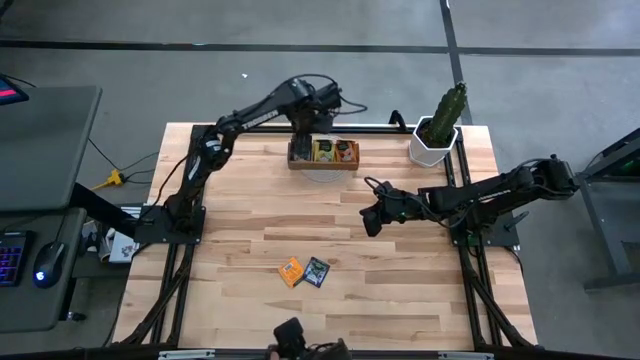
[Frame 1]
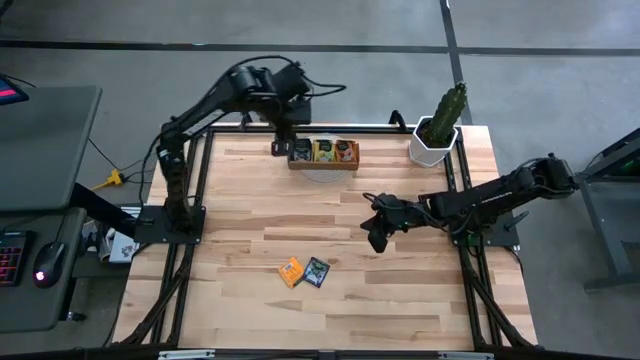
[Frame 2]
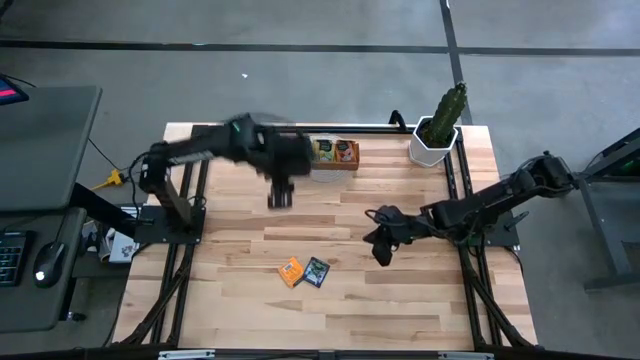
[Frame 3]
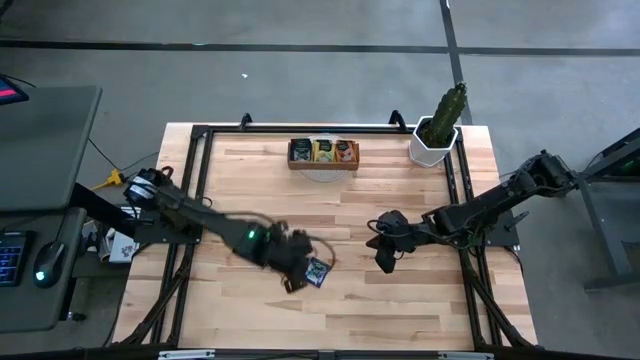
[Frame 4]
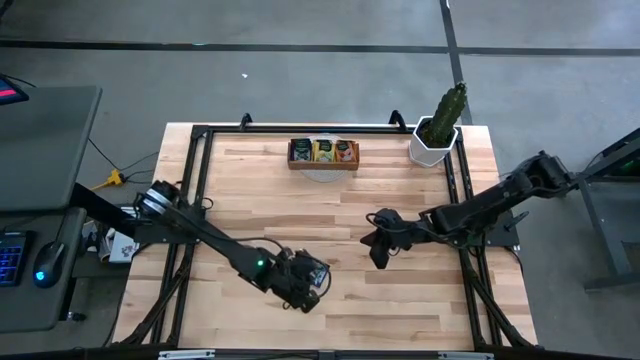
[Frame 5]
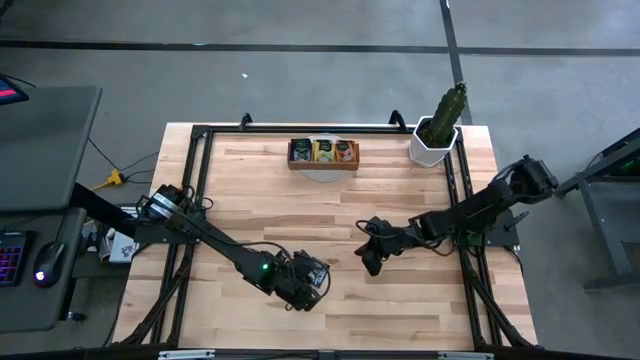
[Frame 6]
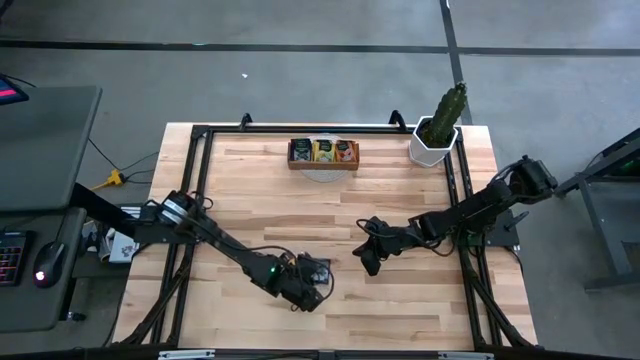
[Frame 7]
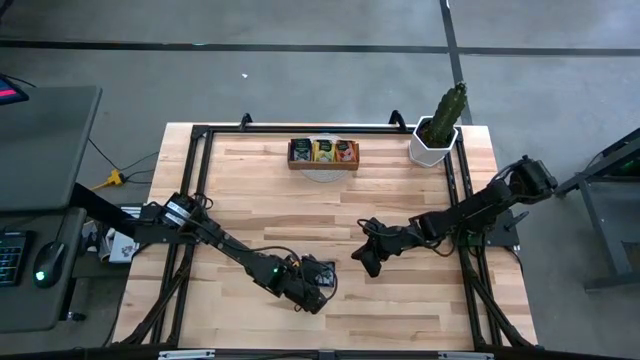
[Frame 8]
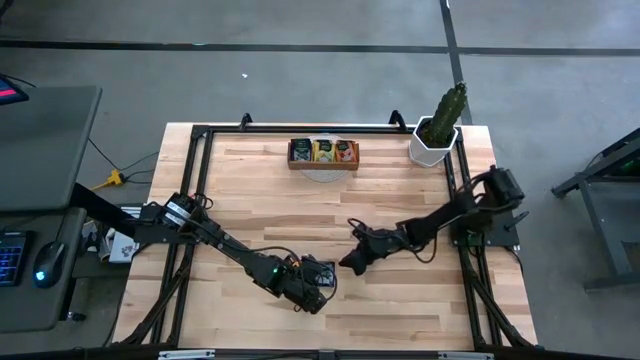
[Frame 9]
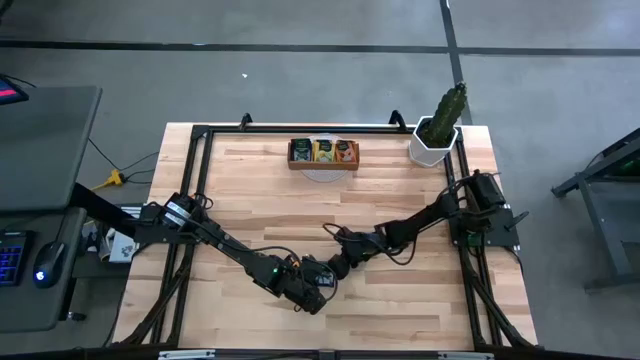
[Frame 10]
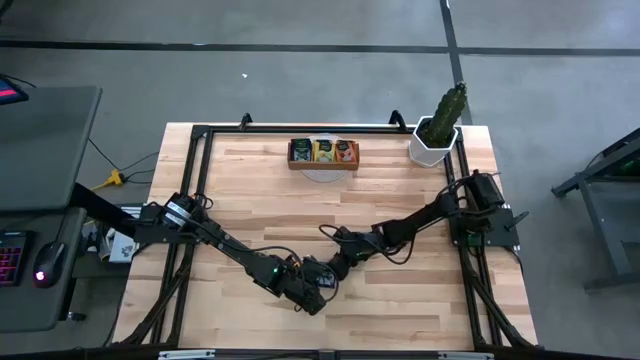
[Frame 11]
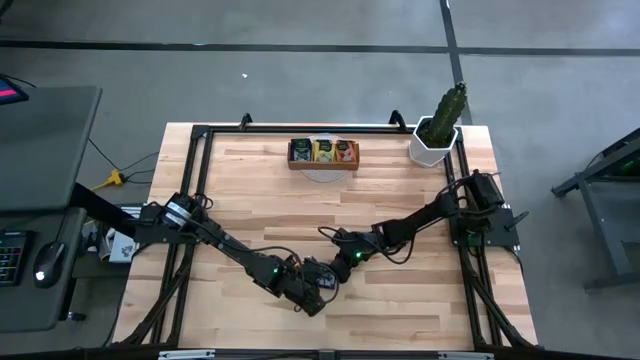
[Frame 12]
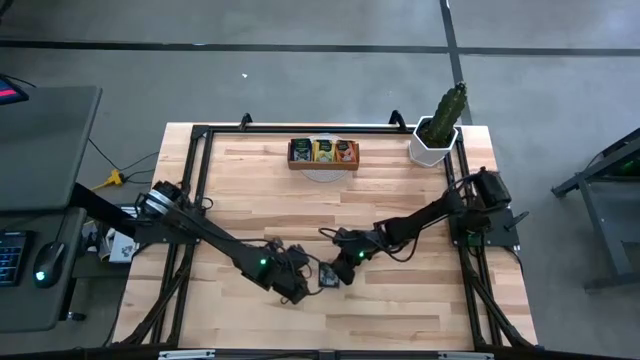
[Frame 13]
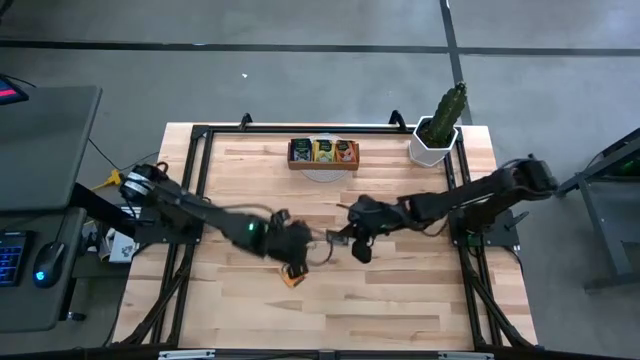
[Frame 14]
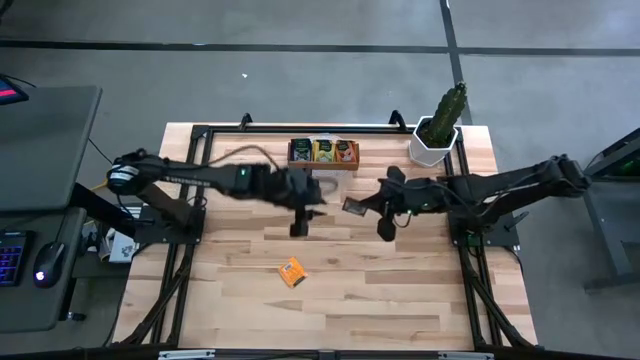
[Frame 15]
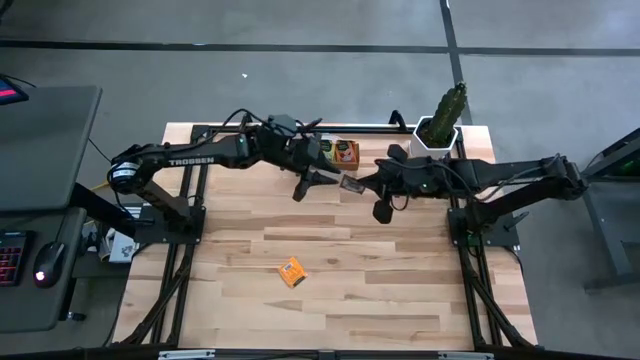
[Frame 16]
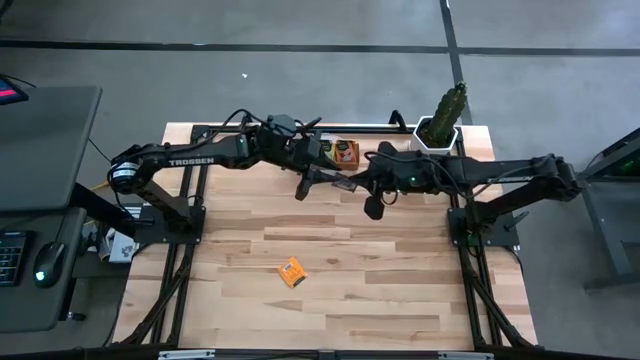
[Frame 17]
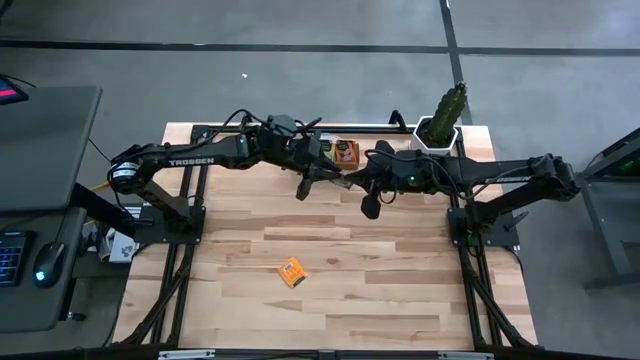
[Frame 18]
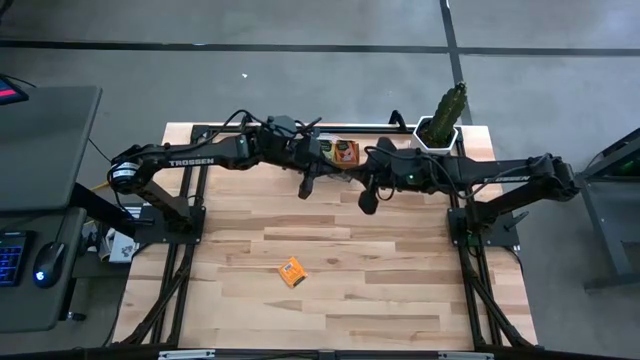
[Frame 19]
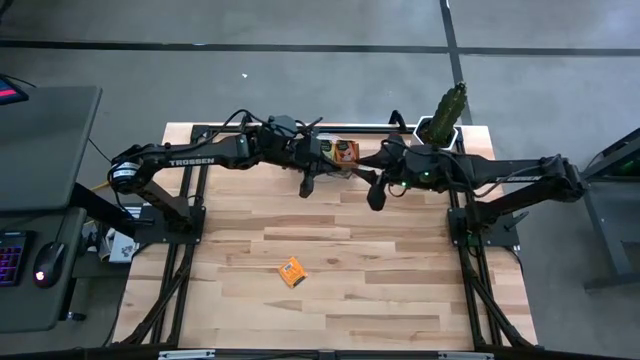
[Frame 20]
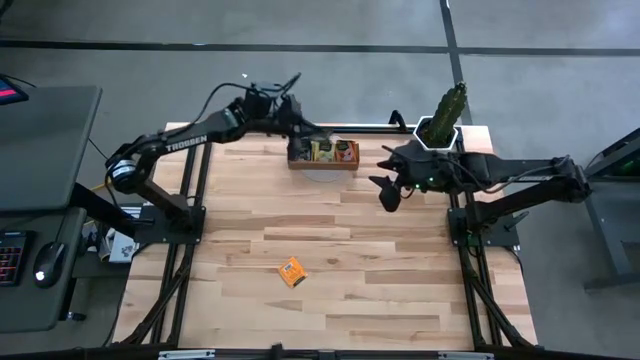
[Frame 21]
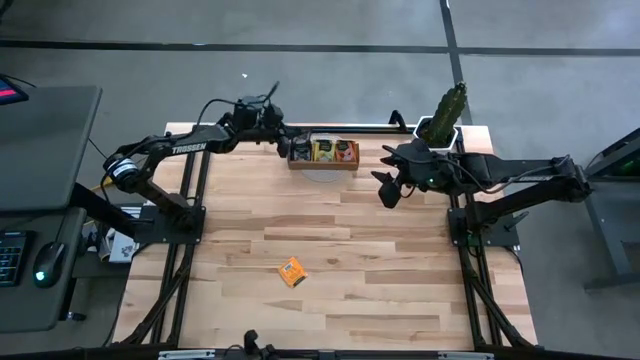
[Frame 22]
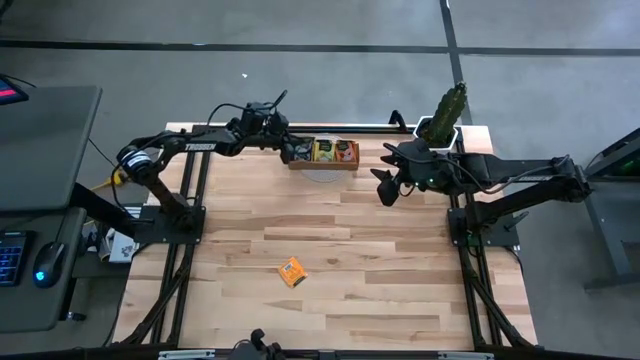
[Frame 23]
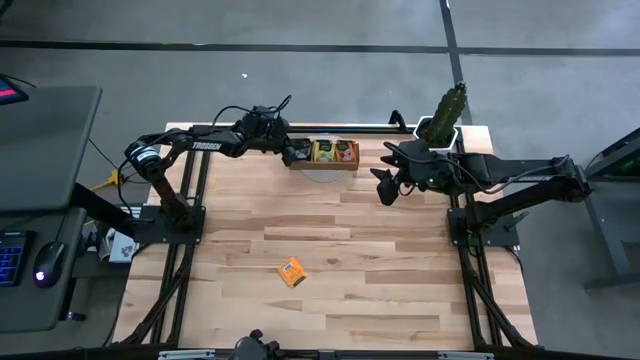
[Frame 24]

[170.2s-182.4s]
Task: Pick & Place Tea
Put the purple tea bag in the left compartment of the organizer
